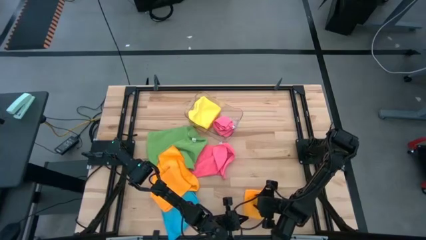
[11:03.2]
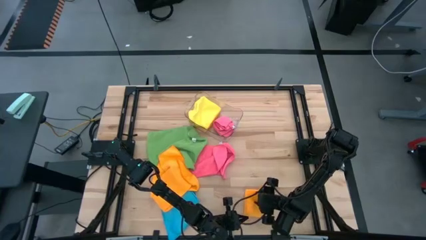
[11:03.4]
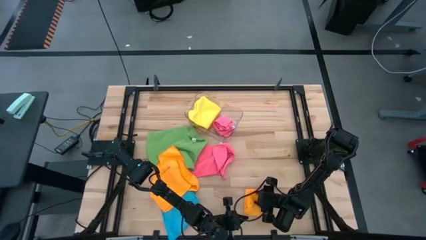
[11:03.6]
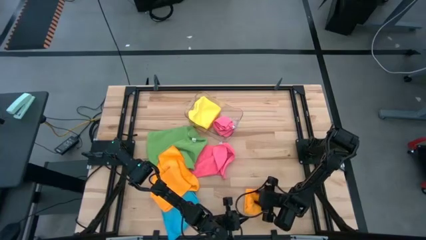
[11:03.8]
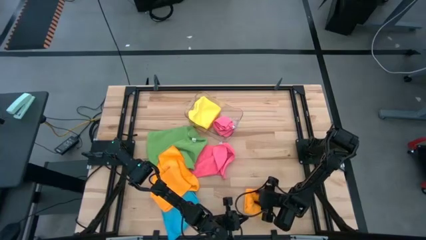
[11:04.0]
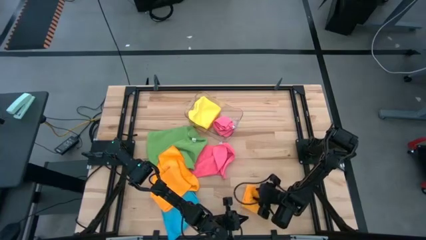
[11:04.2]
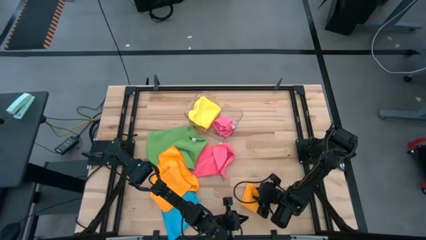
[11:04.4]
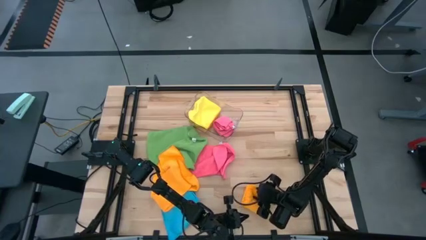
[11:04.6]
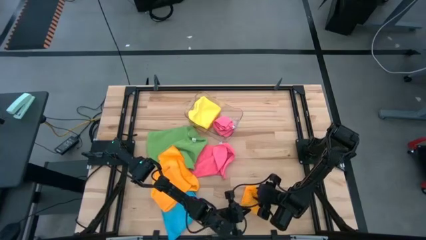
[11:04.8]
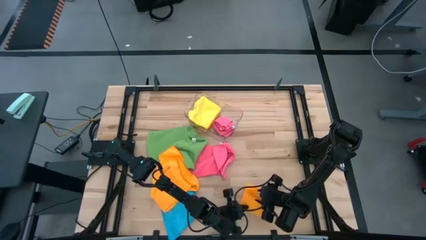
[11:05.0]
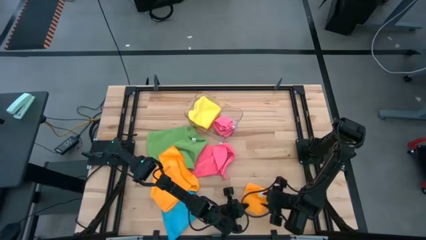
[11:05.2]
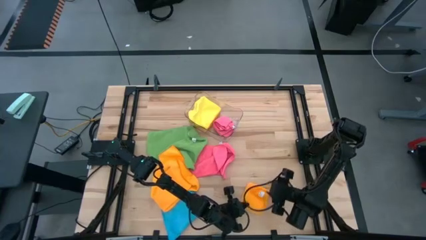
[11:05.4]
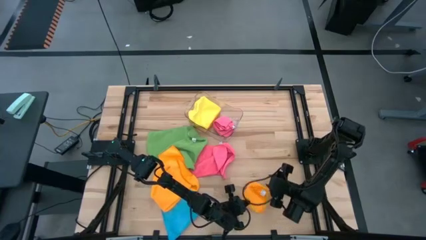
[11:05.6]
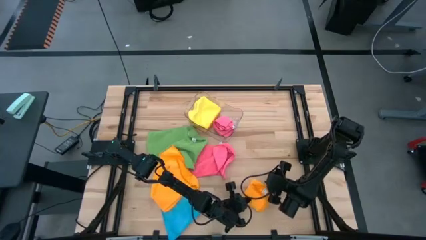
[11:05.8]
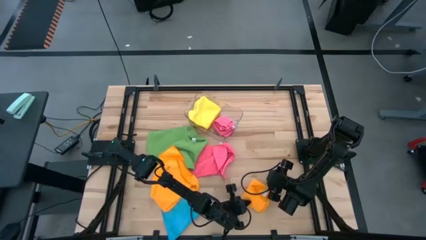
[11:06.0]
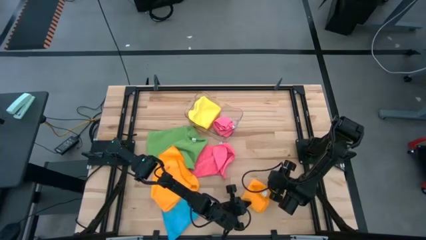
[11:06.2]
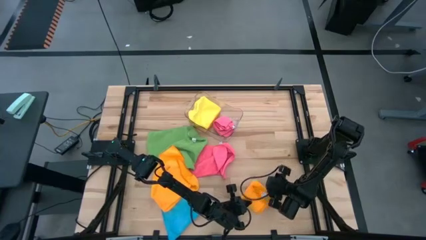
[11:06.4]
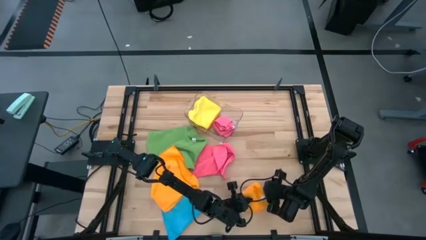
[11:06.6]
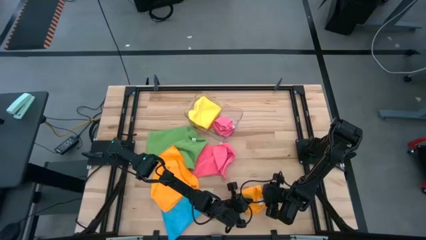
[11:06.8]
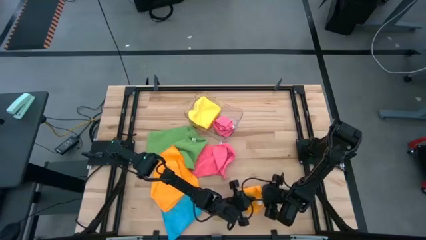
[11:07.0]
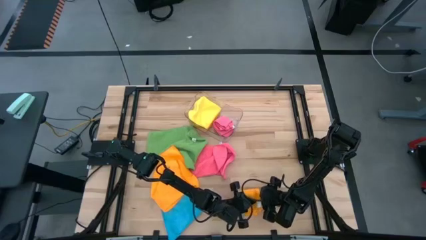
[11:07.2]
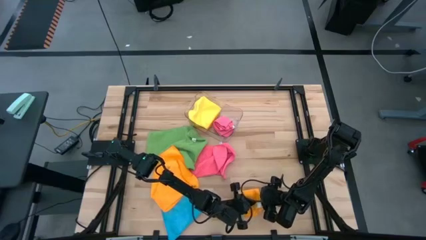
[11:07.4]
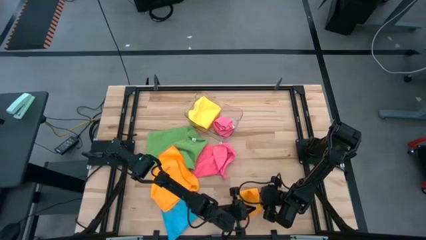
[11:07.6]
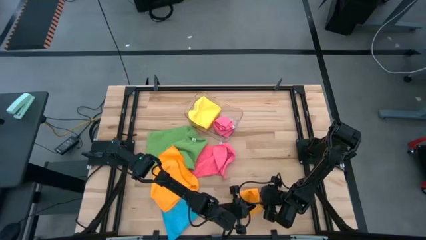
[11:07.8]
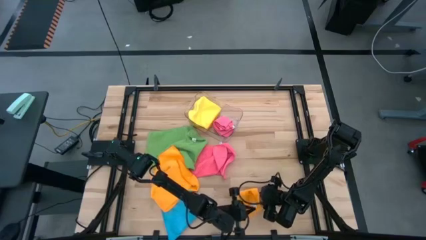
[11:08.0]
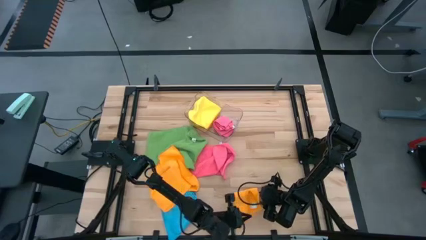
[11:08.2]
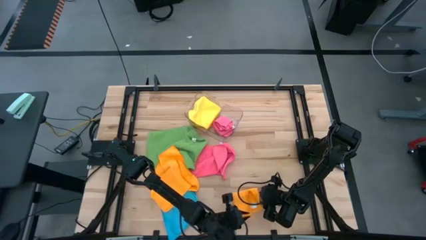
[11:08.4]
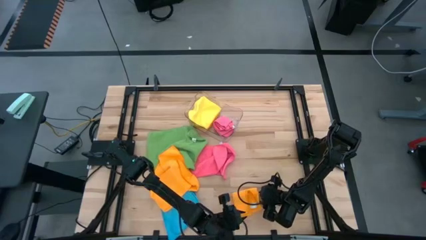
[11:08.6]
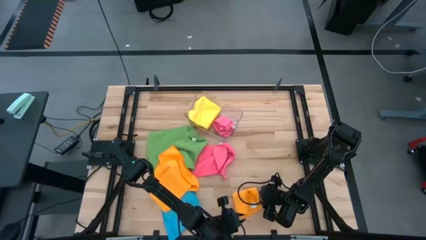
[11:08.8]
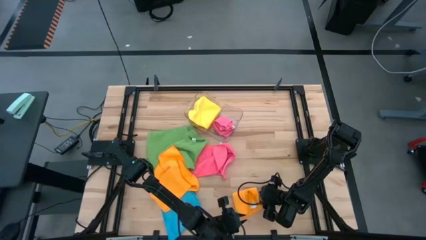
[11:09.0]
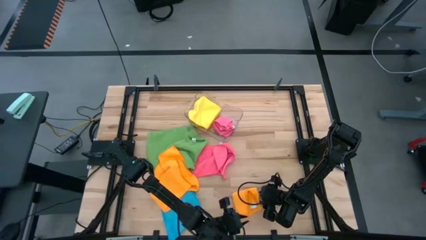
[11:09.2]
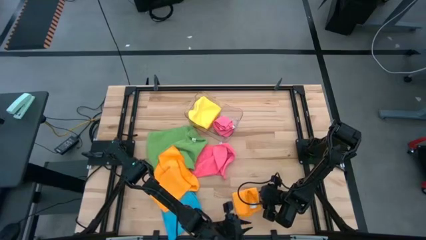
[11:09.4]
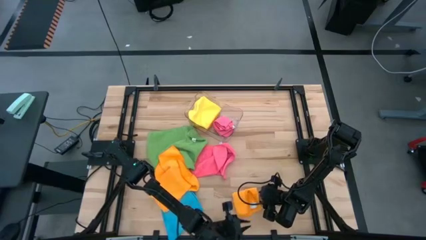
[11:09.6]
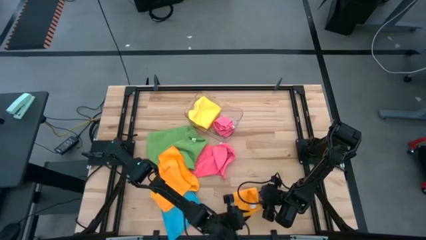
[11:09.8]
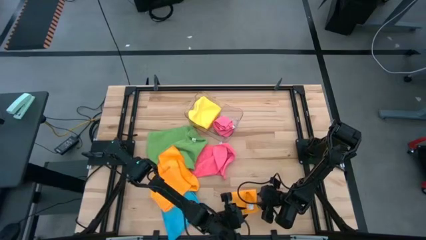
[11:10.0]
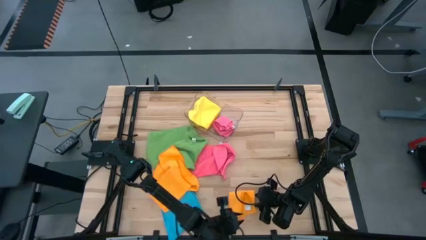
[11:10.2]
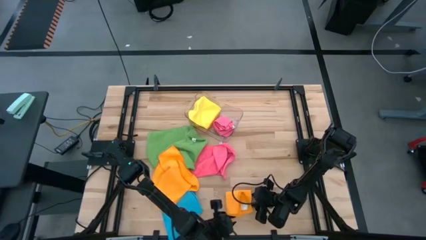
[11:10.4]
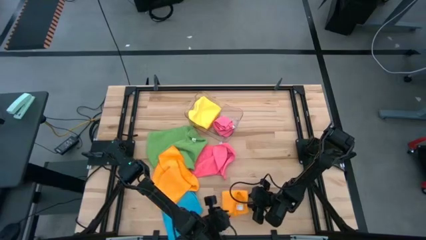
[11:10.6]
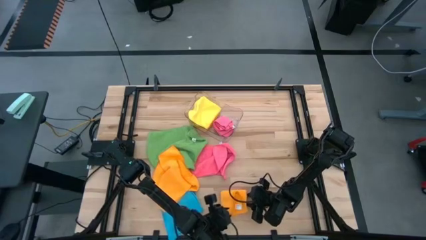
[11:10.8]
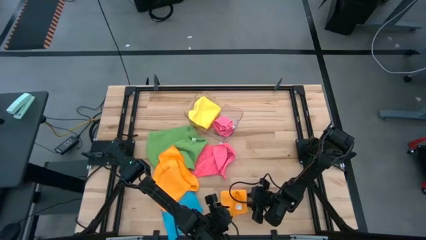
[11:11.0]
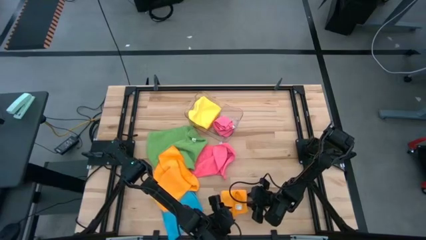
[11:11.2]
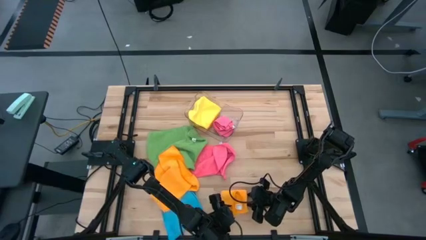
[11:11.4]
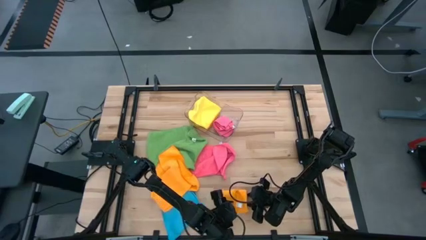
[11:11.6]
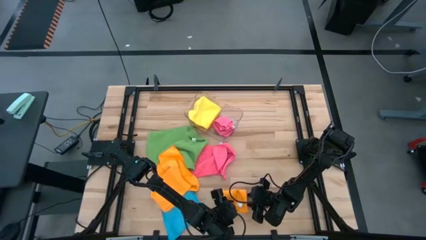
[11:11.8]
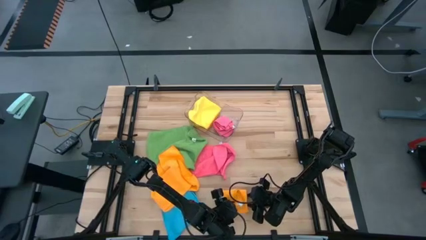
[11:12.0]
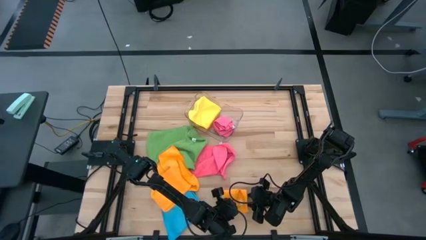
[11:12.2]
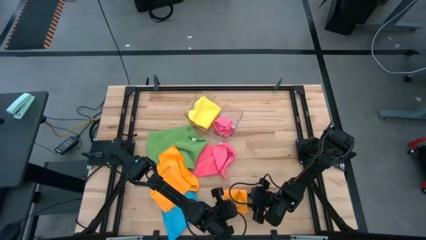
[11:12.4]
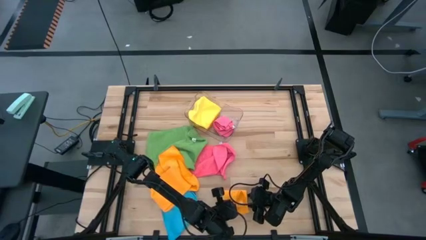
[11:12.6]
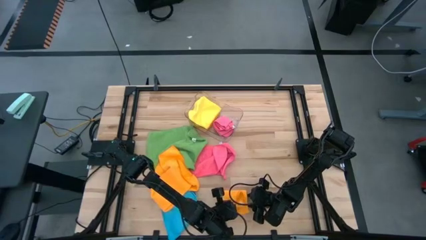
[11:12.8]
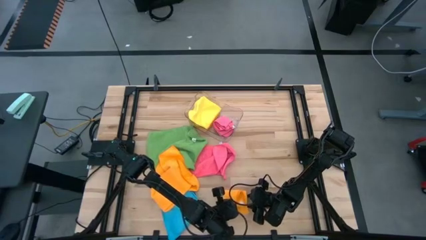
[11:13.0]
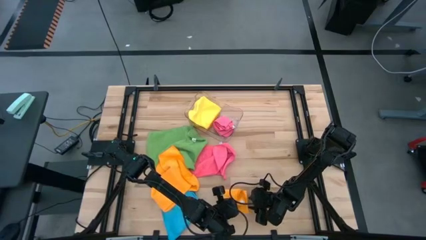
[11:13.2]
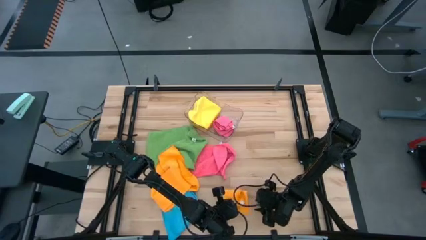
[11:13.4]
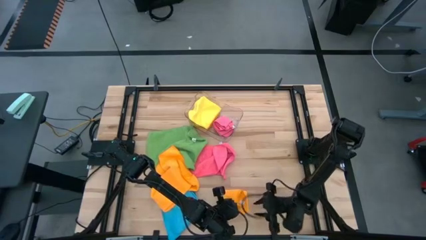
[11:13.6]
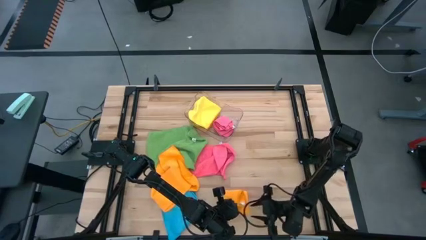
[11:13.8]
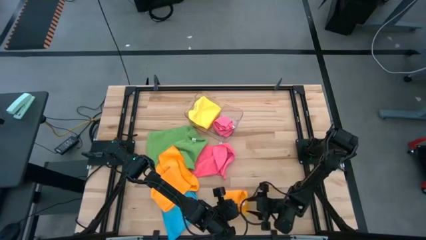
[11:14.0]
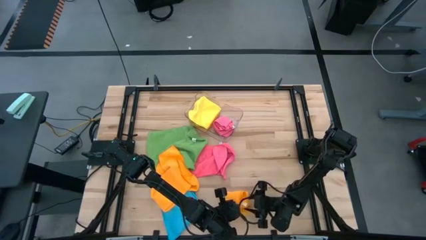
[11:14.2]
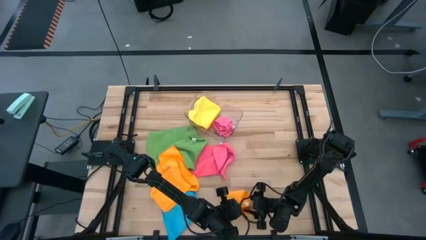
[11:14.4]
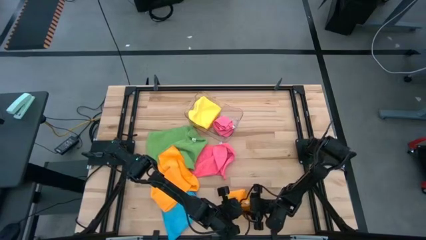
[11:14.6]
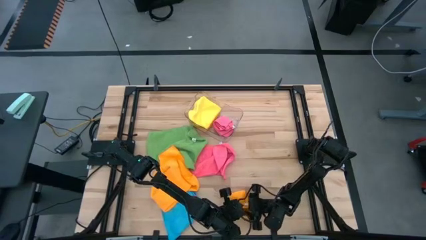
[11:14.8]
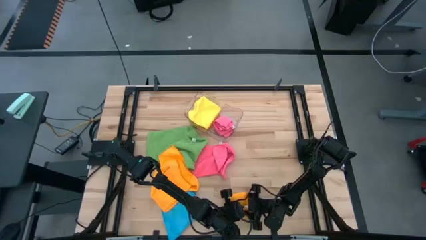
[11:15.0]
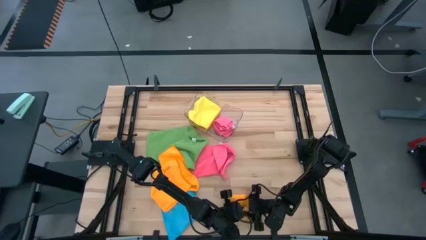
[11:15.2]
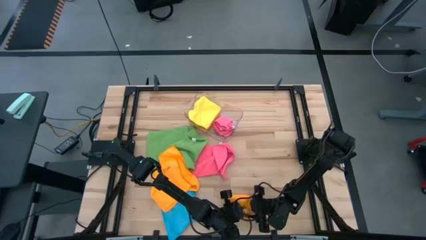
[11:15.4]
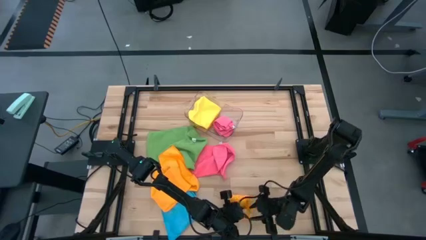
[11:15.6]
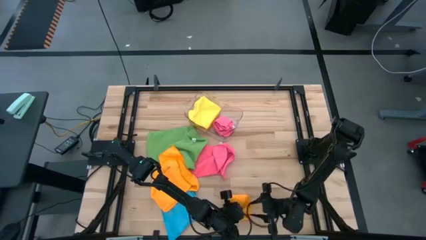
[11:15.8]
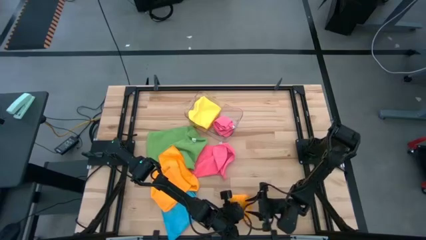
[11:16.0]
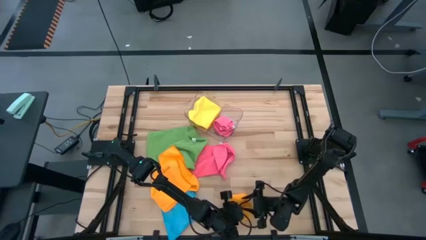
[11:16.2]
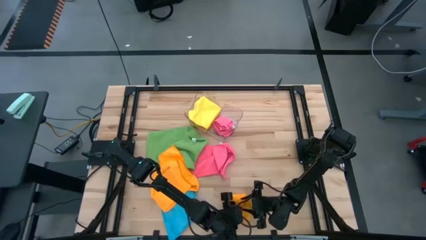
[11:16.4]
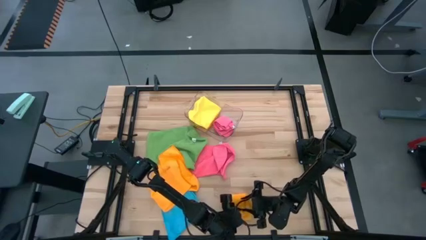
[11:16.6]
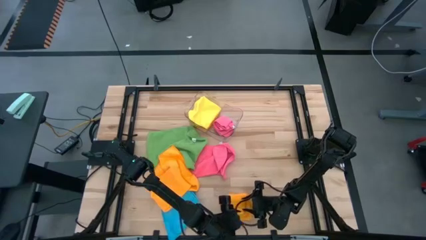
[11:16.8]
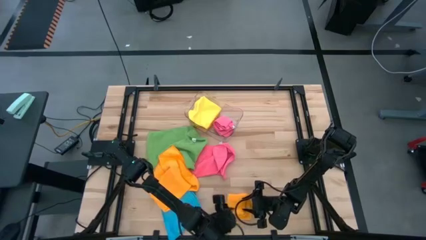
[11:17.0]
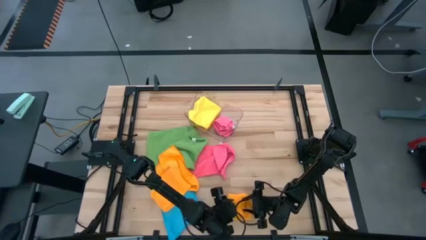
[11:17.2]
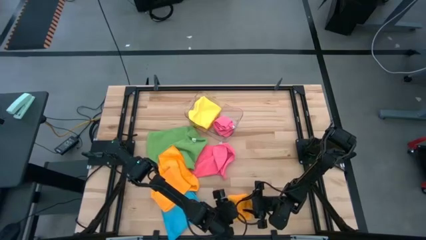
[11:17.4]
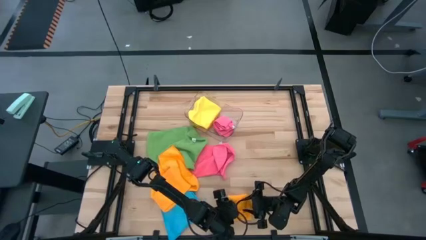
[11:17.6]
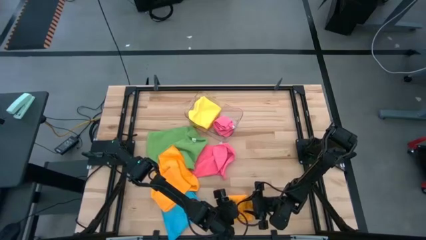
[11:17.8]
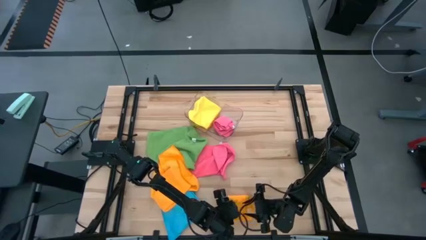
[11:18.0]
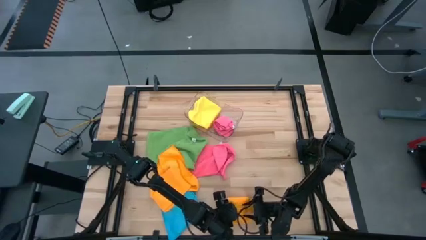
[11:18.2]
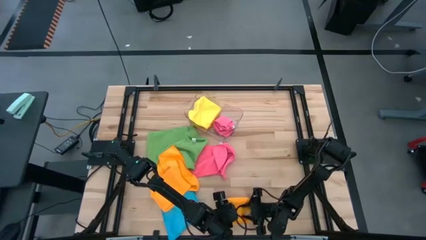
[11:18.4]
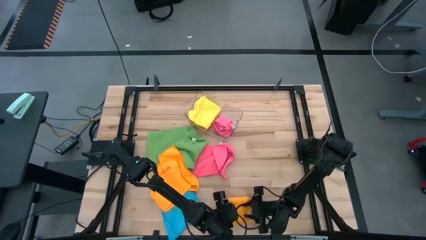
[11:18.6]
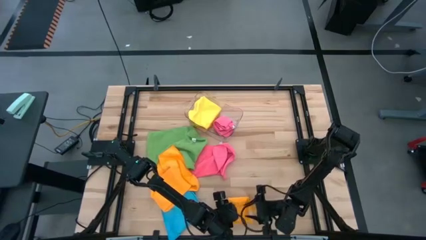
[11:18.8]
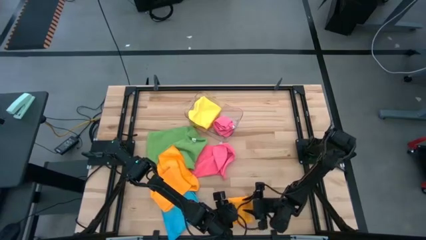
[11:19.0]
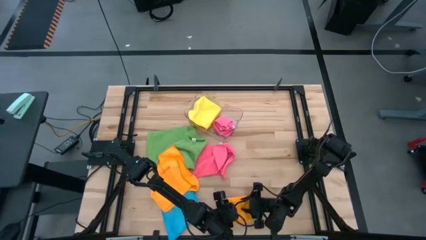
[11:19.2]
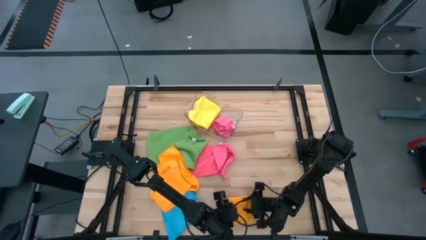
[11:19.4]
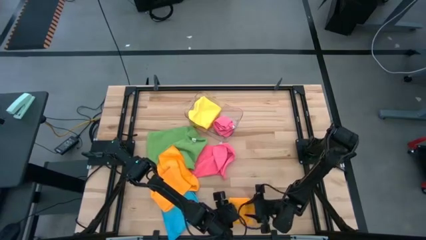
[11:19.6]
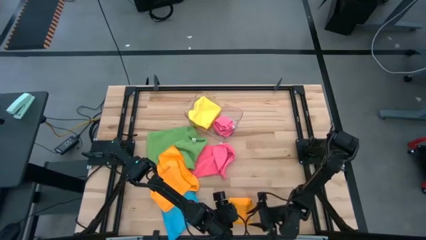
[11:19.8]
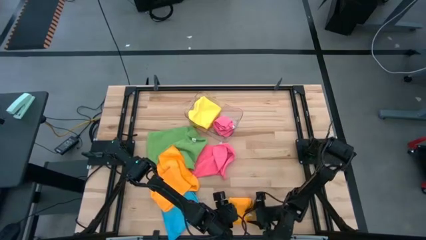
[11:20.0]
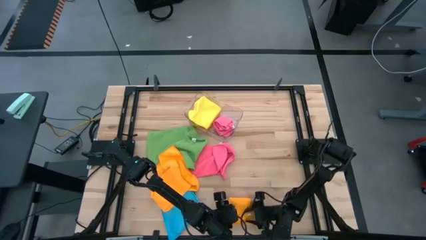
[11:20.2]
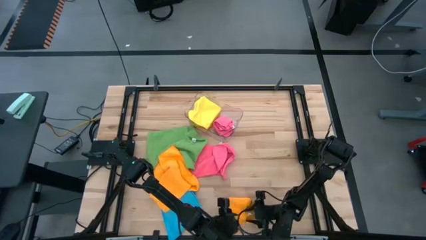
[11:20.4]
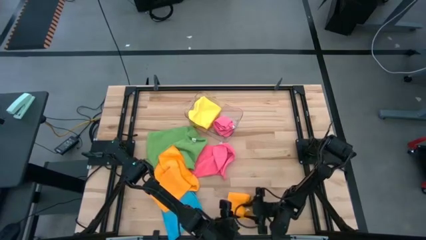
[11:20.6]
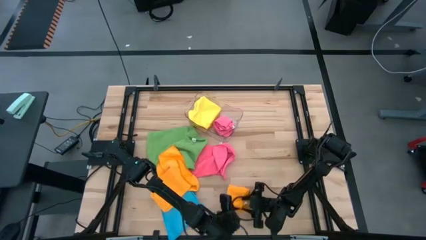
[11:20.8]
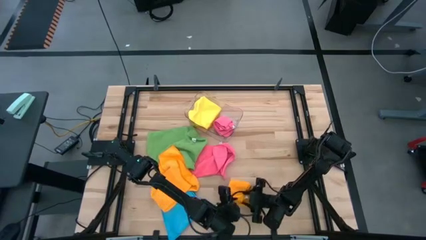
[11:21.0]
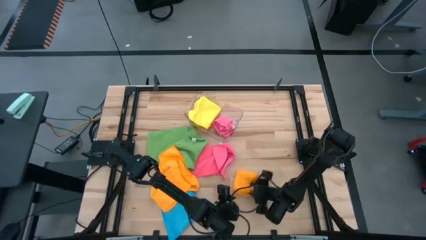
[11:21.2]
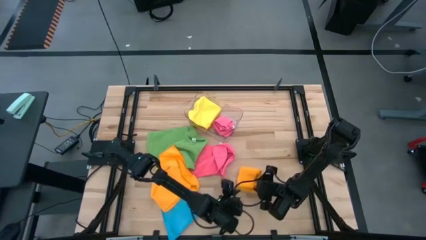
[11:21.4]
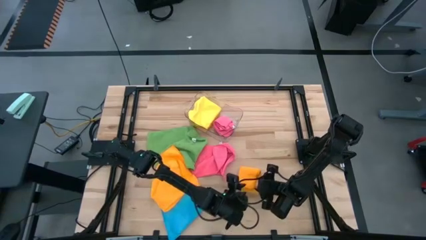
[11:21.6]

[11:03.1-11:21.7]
Task: Fold microfiber towels
Fold the right orange microfiber cloth
